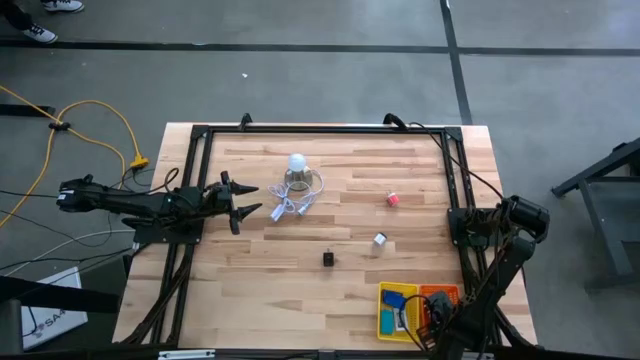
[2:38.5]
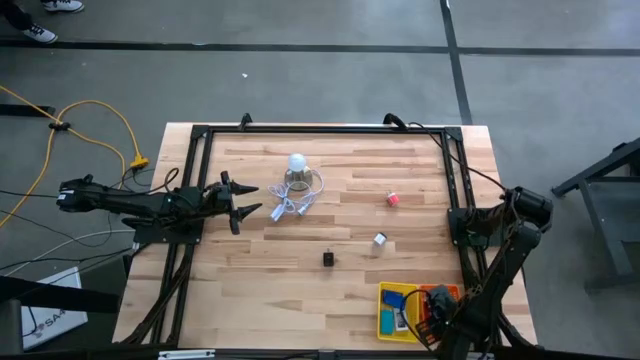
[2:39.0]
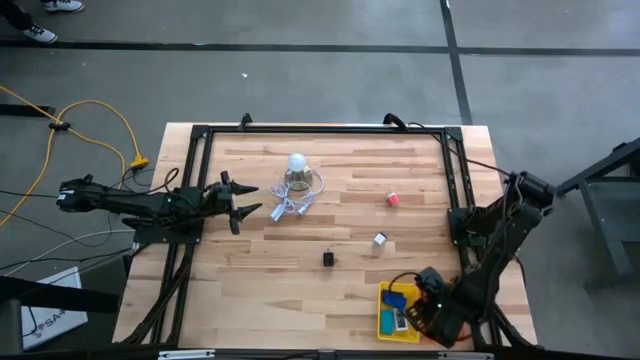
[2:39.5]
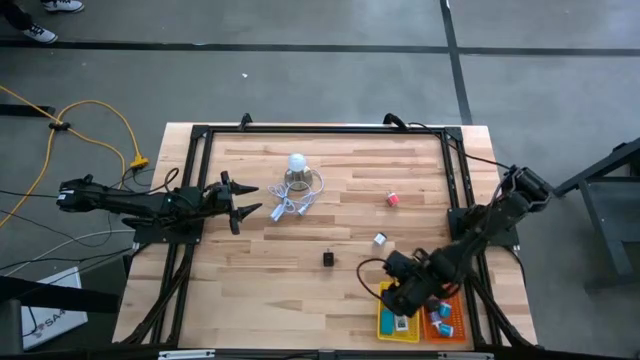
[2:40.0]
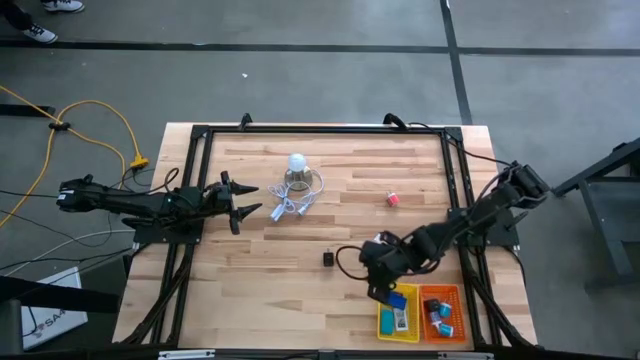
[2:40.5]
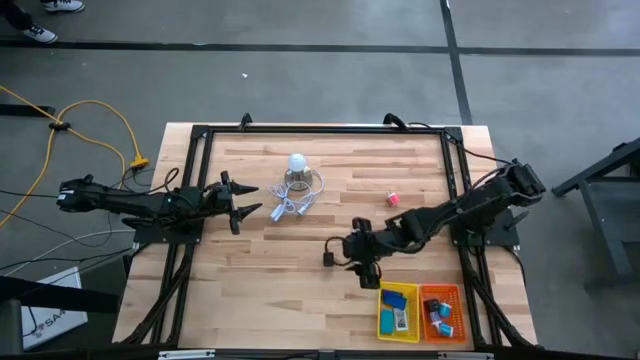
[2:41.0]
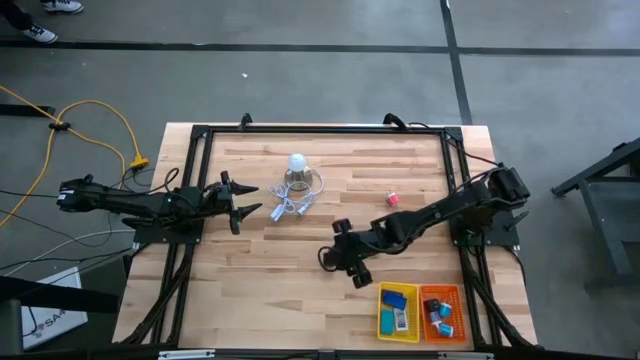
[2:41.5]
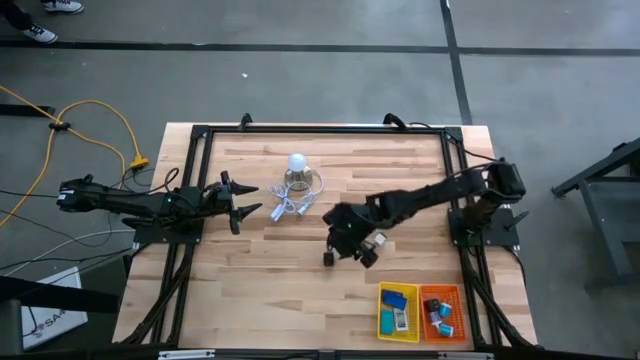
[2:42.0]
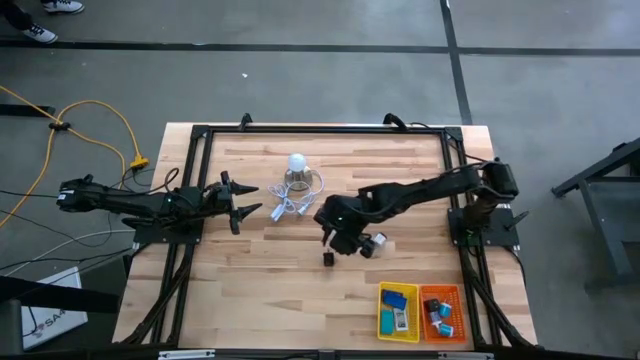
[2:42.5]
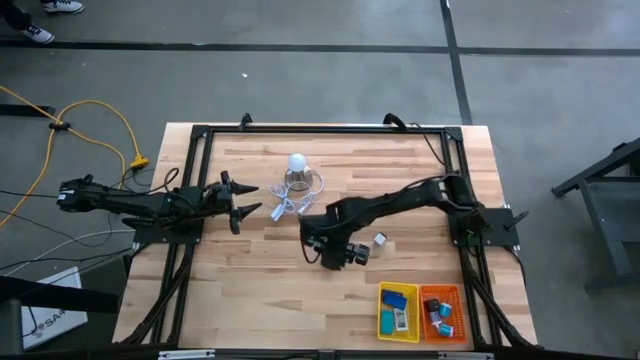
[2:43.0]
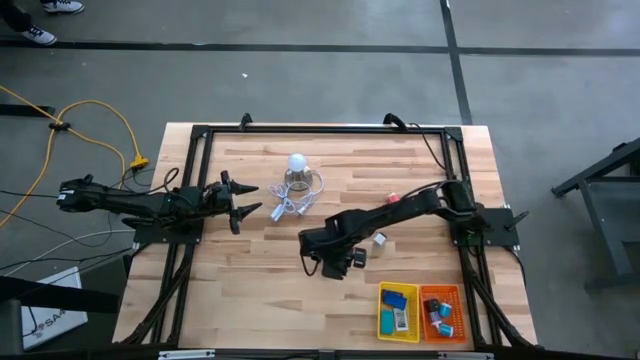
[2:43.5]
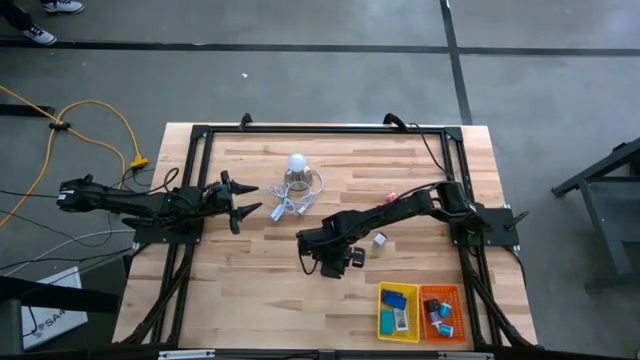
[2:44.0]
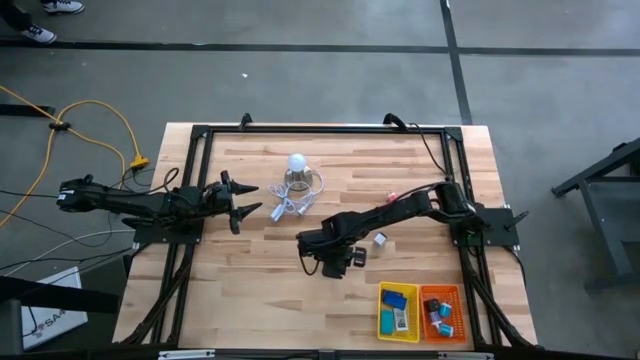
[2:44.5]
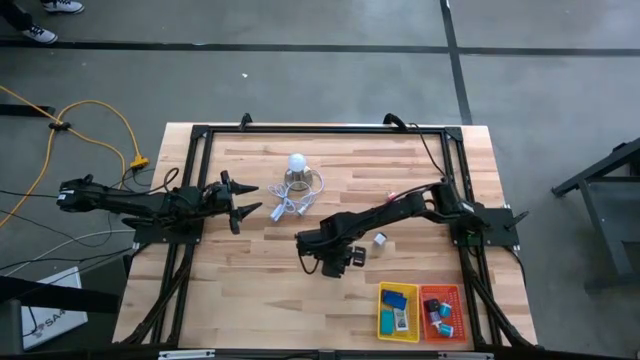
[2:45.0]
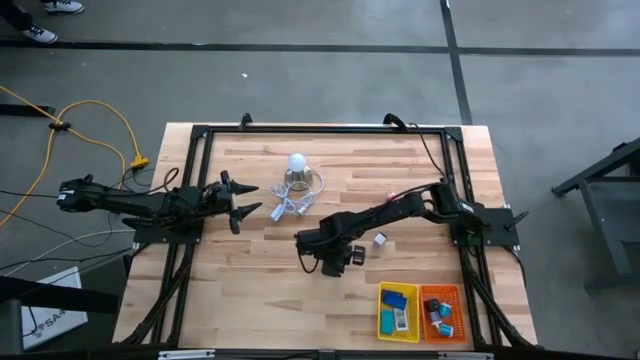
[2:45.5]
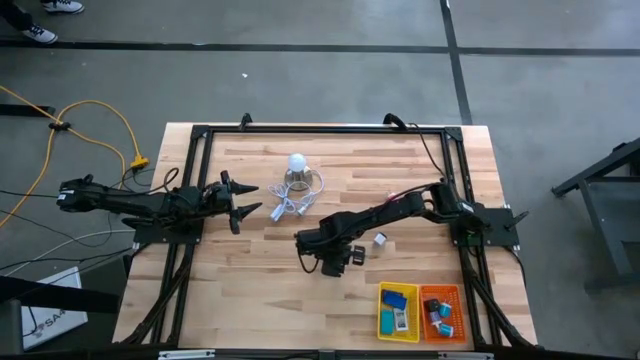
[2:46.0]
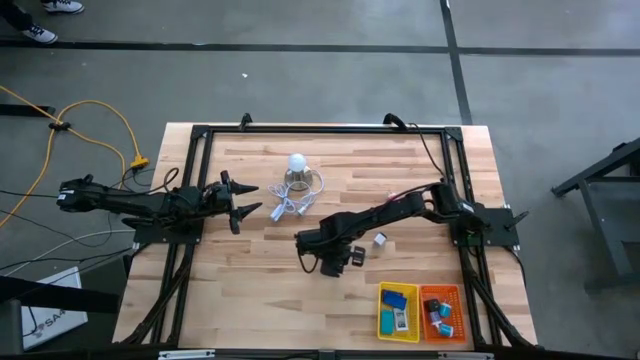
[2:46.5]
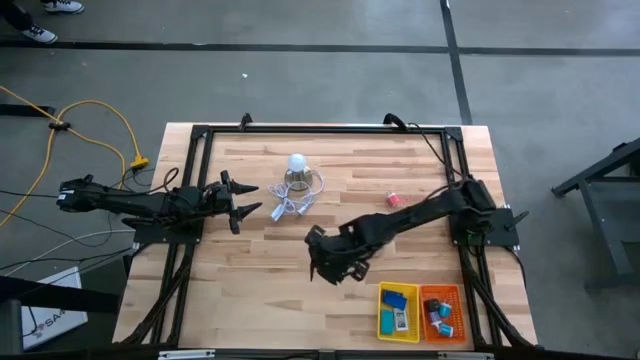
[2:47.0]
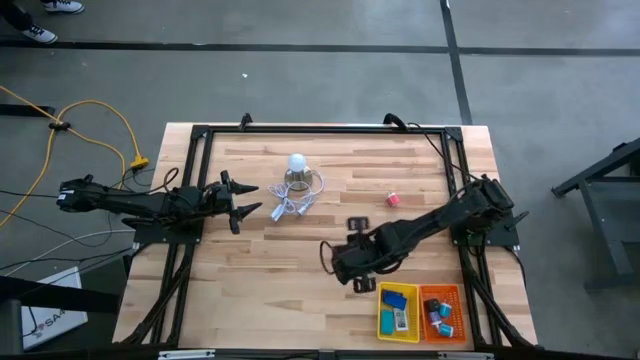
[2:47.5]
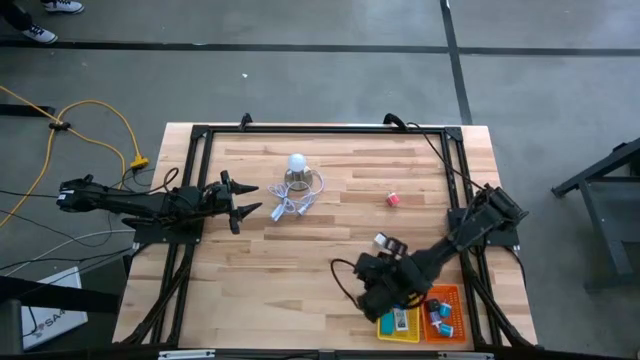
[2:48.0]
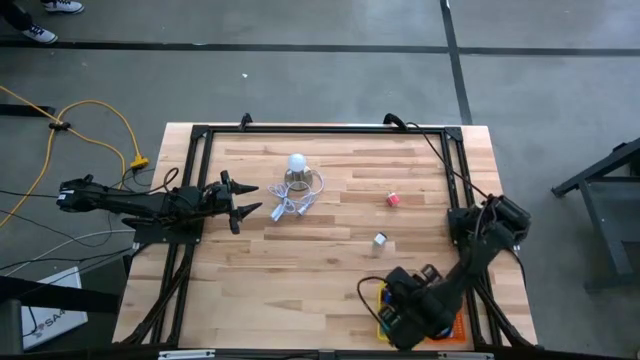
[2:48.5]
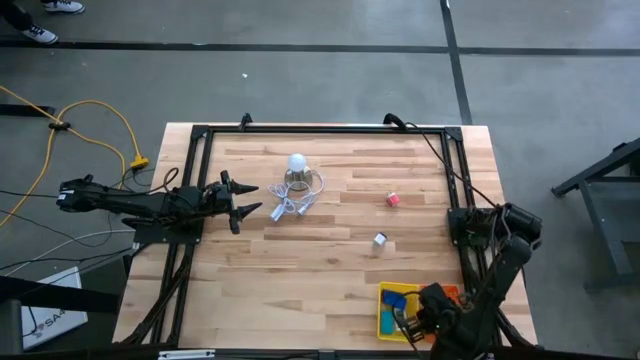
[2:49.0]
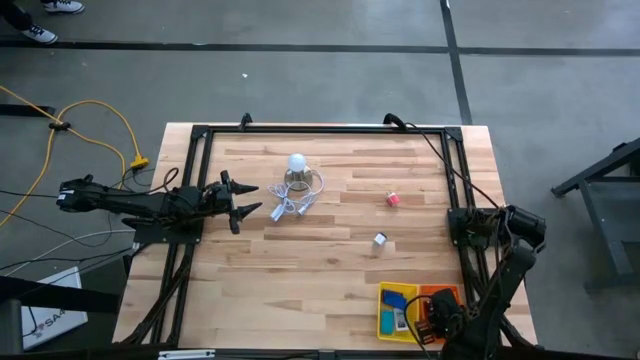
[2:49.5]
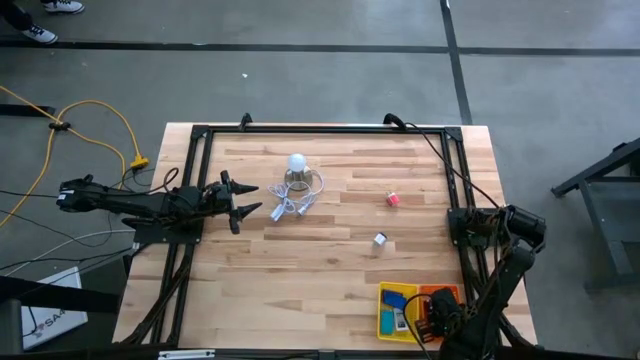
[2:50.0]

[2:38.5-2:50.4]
Task: Pick & Place Office items
Put the black charger adapter into the orange basket

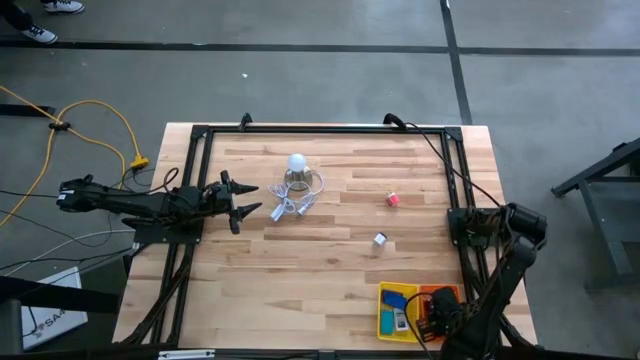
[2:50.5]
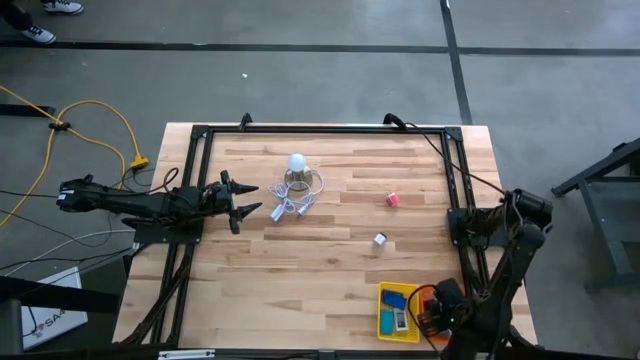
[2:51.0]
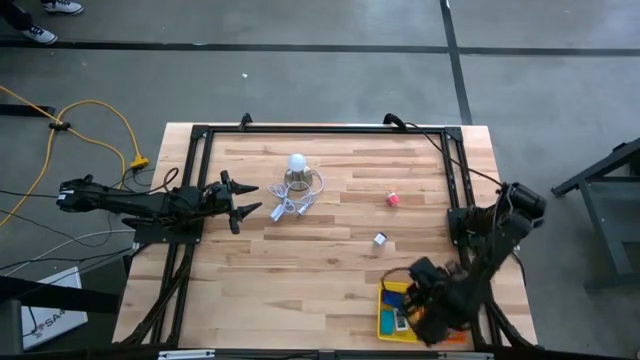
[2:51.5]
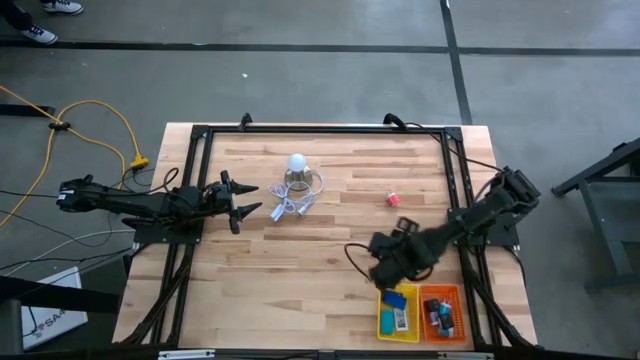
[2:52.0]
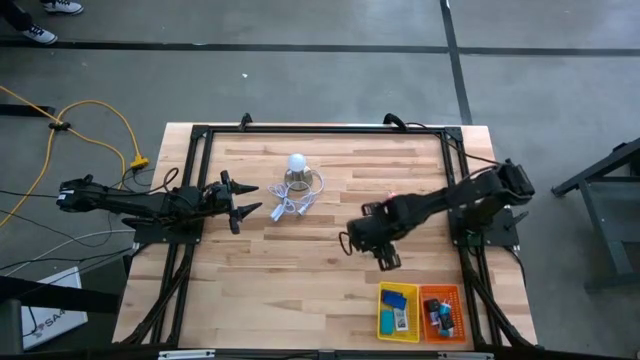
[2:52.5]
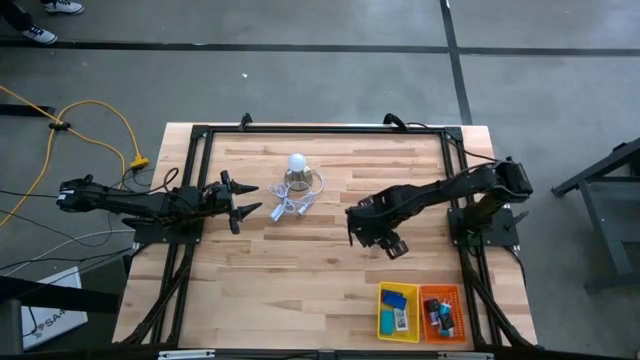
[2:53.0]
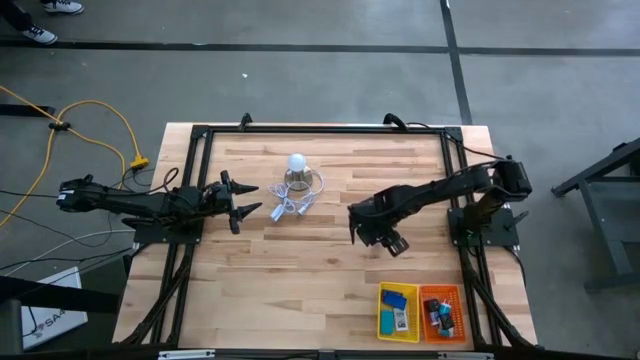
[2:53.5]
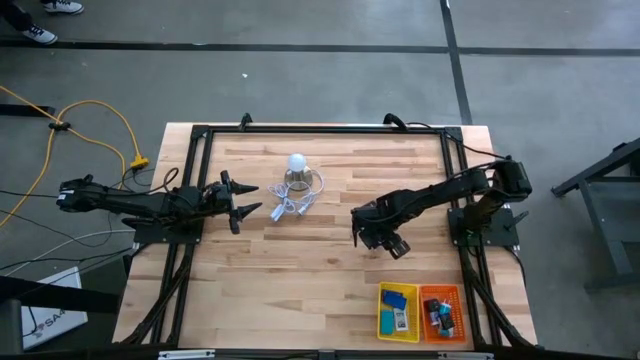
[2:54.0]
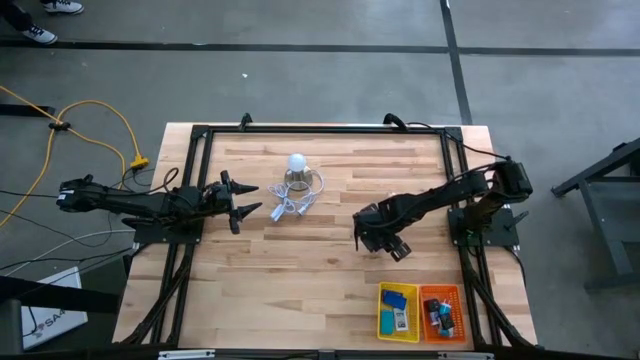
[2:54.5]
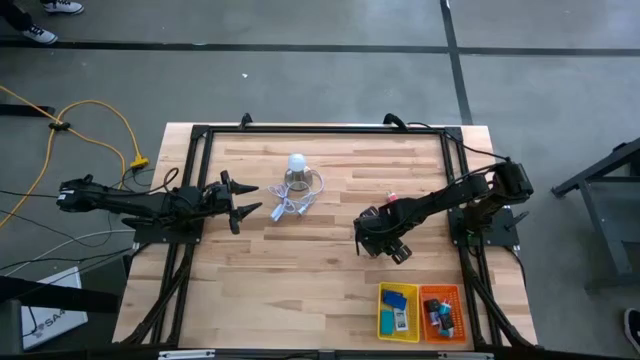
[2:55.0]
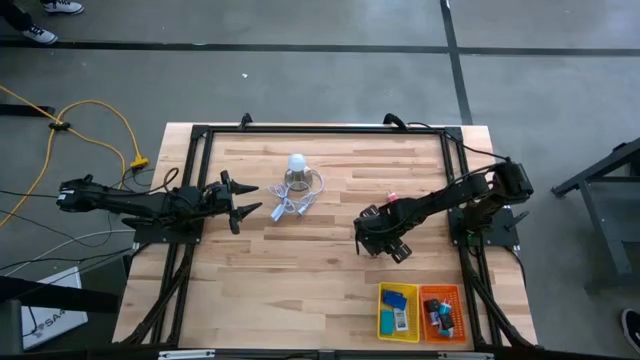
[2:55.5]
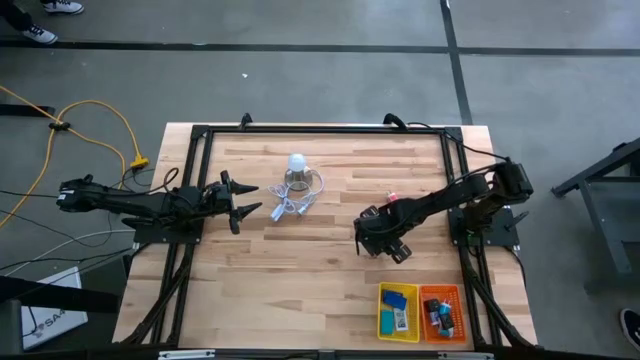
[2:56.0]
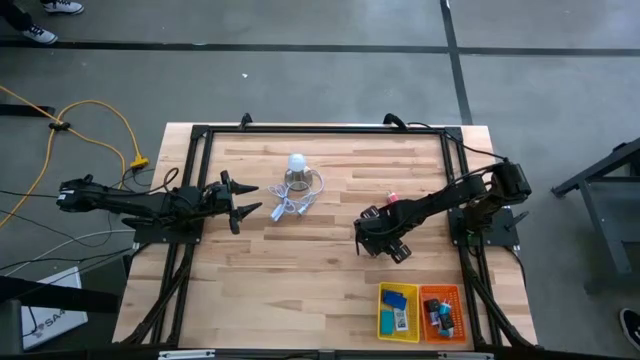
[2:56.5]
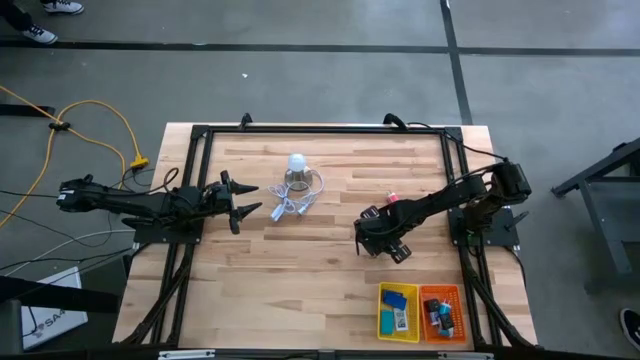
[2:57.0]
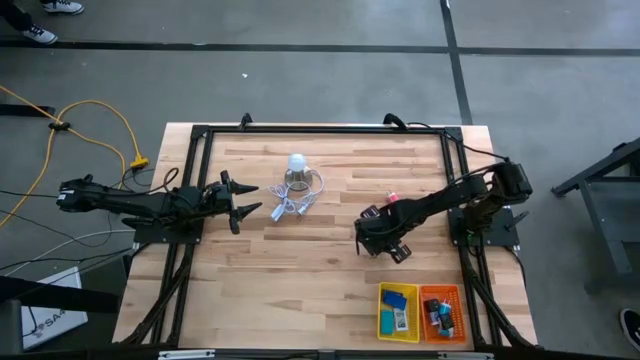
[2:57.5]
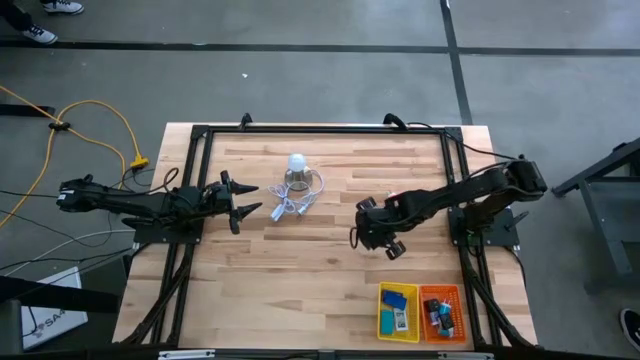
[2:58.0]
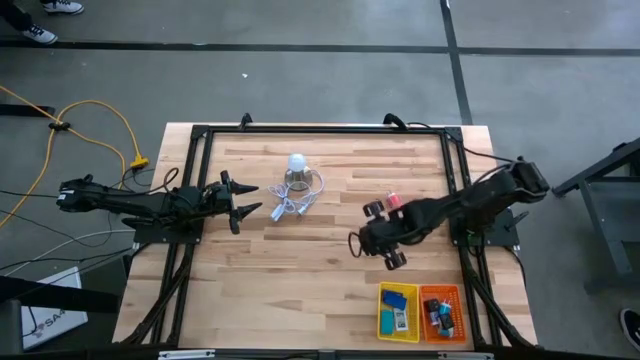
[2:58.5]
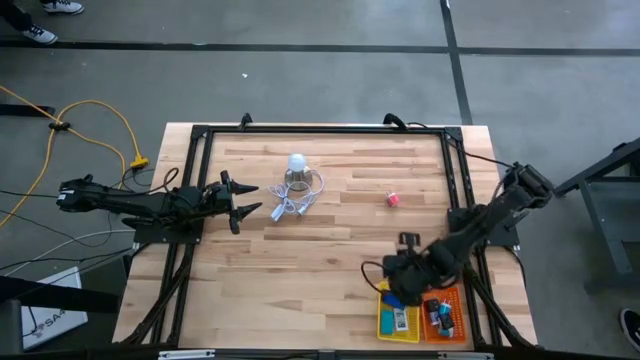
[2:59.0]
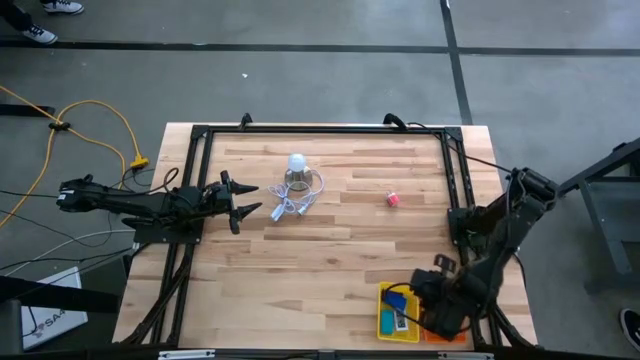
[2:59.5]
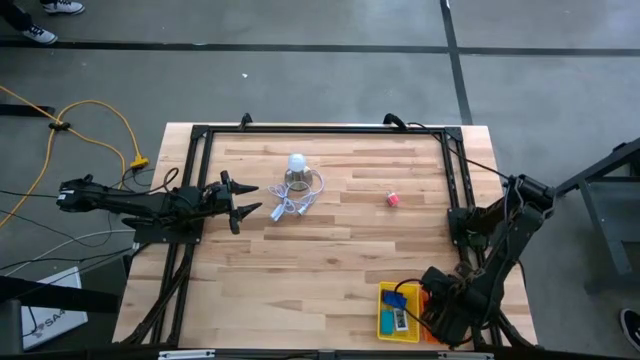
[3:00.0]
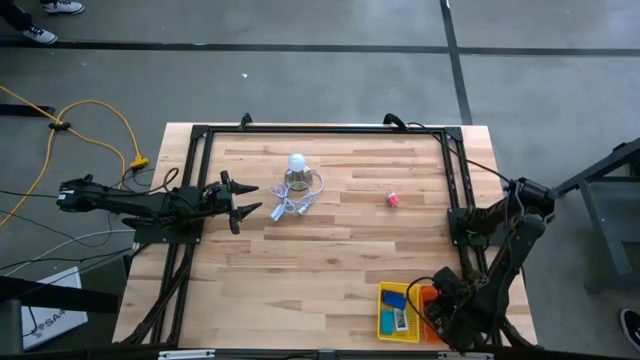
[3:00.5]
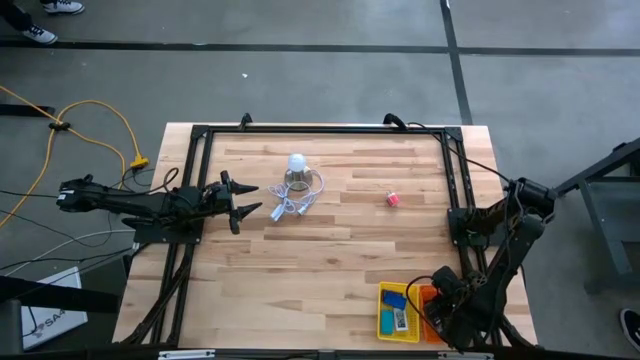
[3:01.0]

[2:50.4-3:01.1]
Put the white charger adapter into the orange basket
